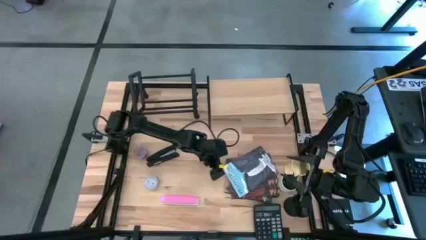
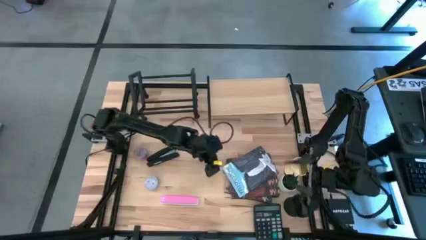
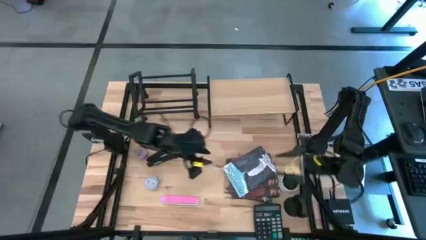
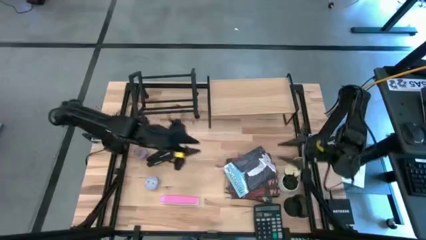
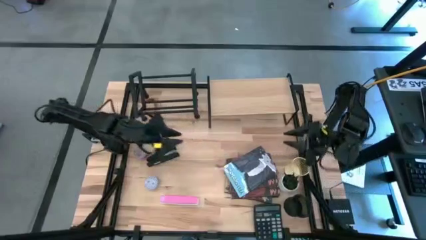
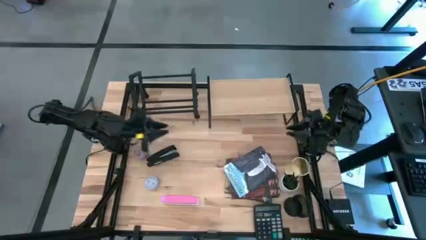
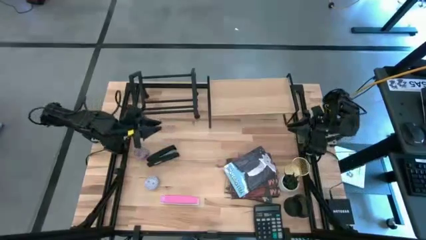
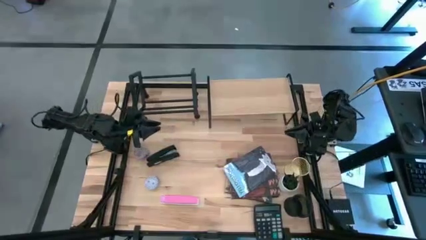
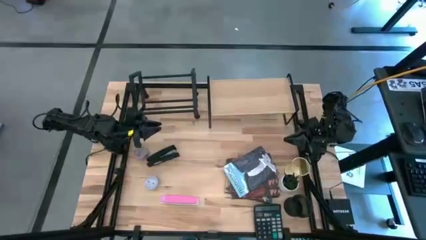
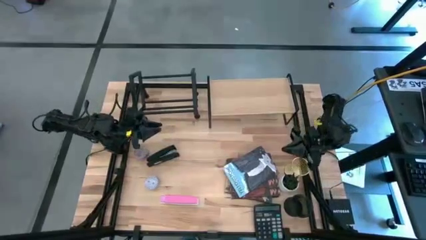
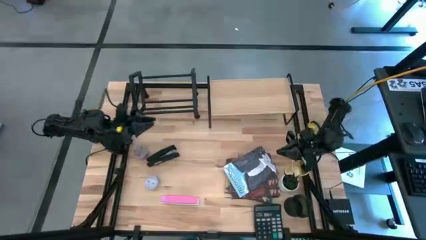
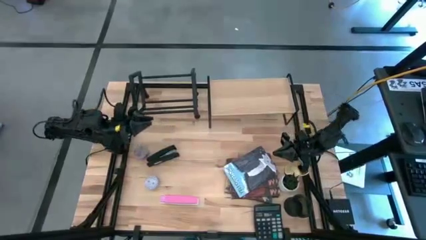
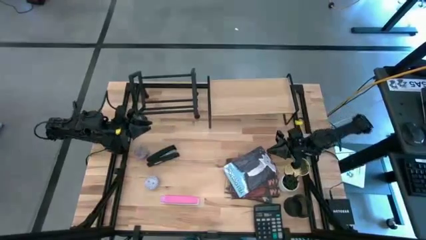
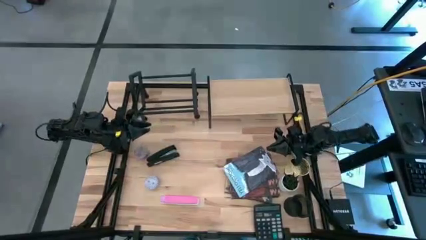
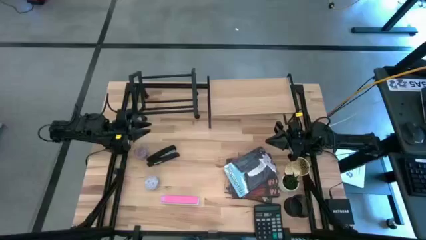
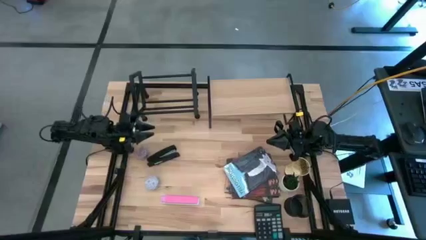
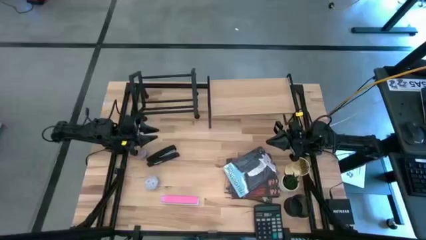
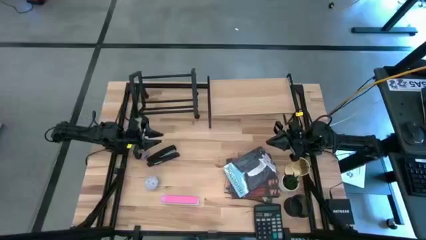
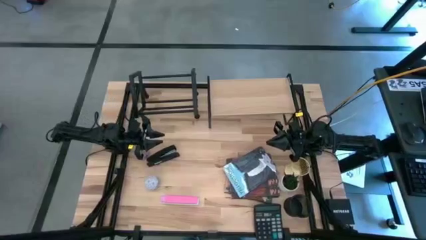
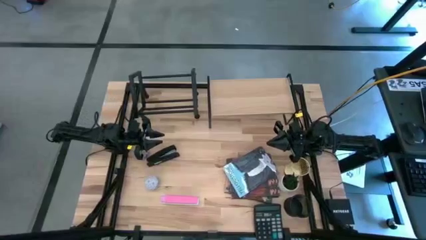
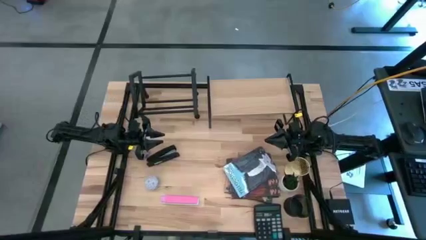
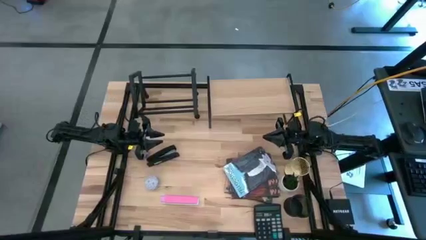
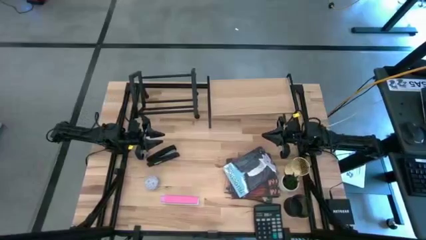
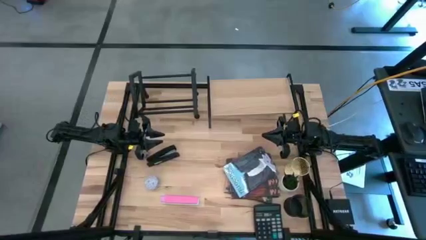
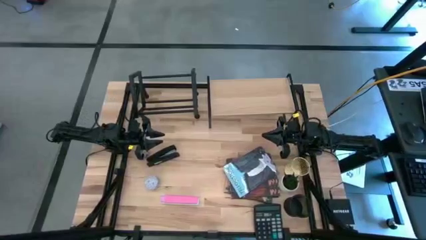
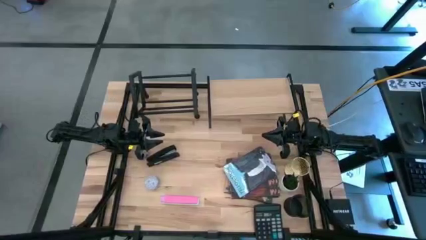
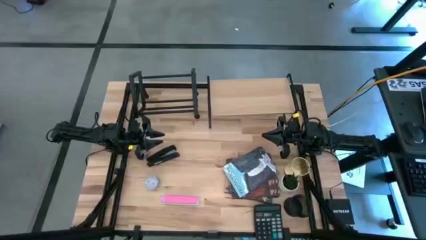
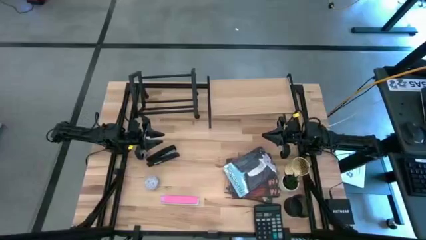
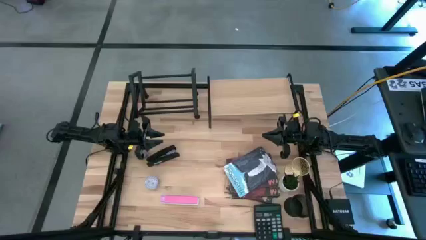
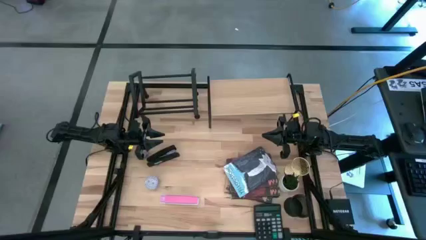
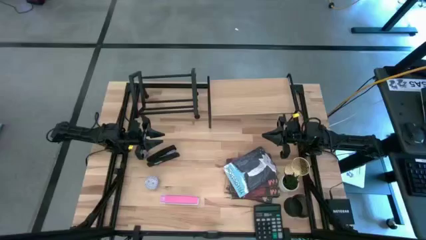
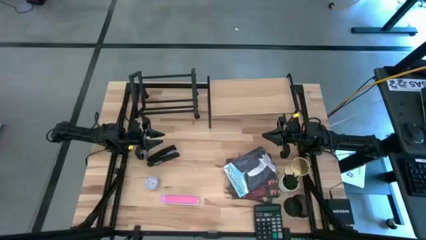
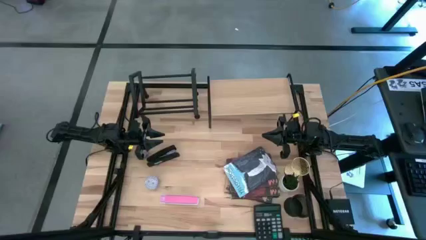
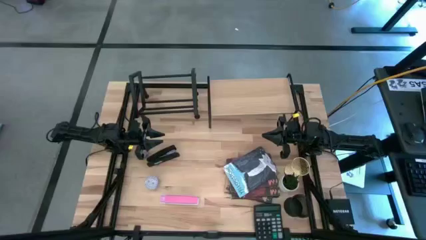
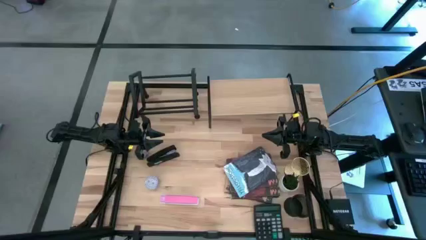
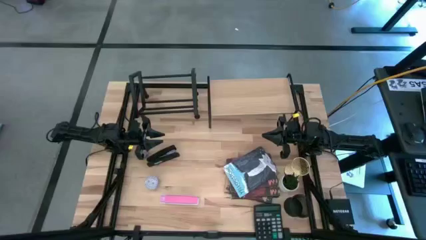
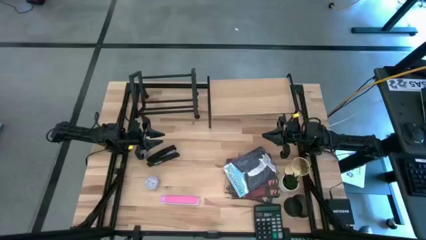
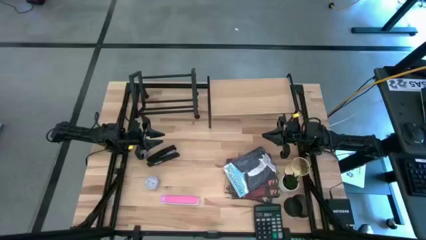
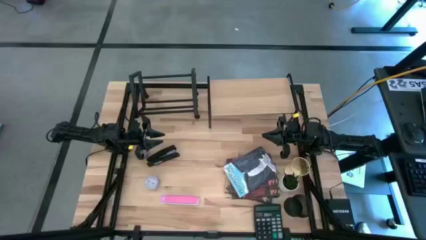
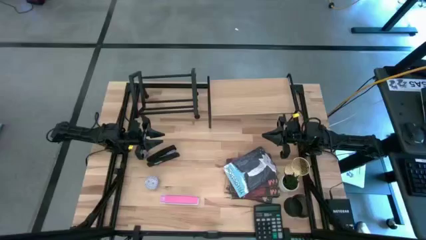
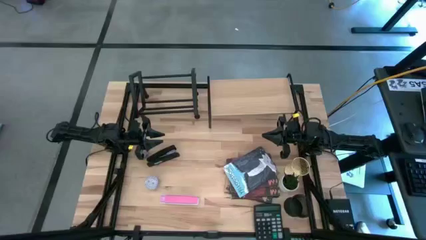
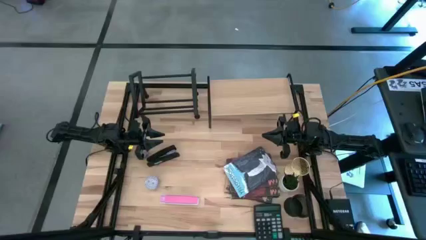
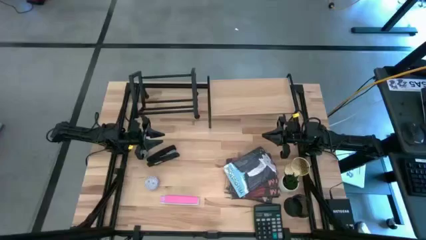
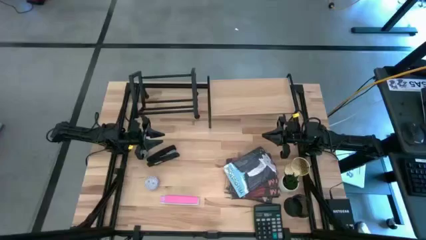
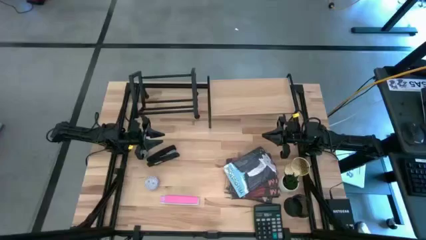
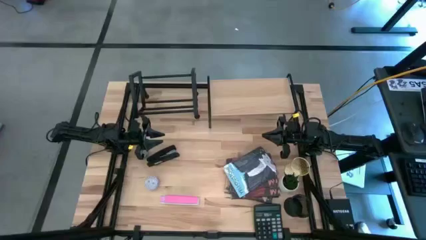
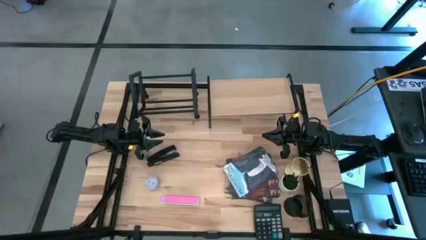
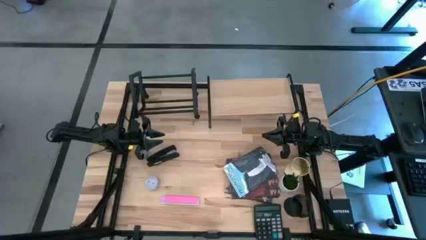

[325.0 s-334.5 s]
Task: Stock shelves
Return to home position

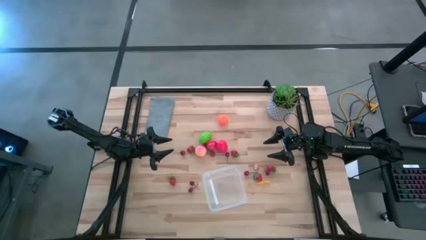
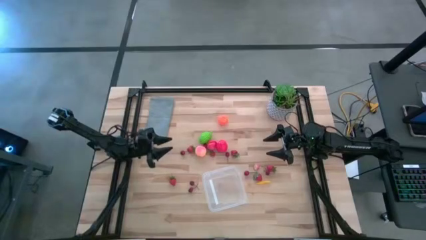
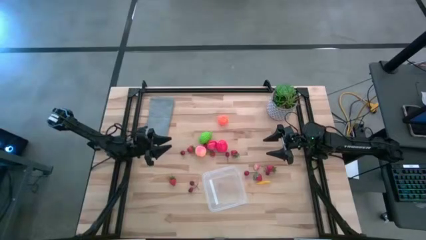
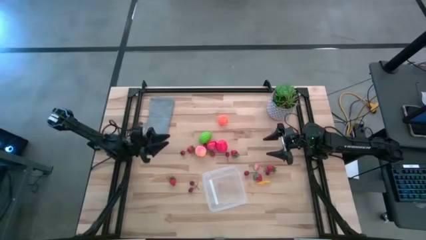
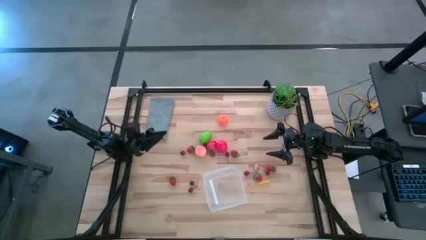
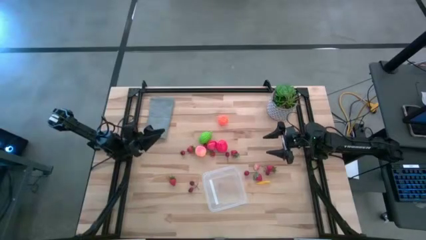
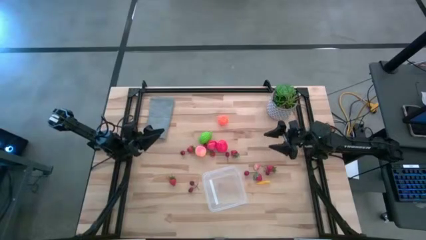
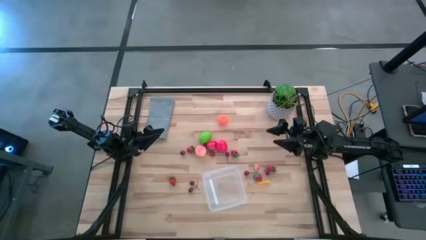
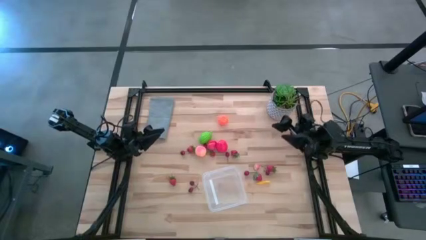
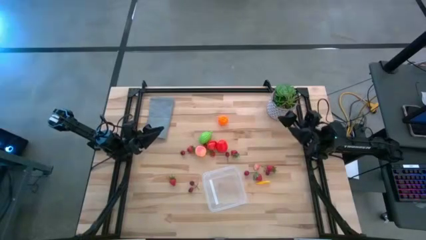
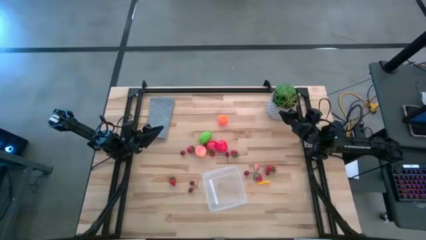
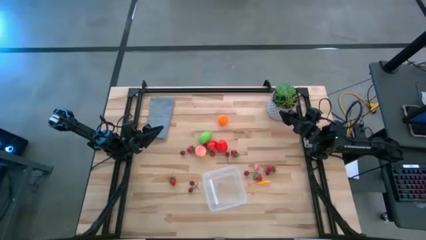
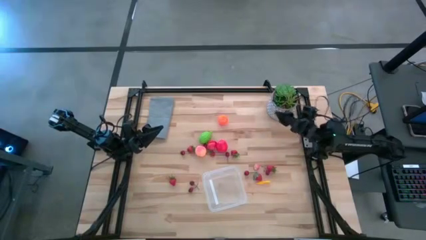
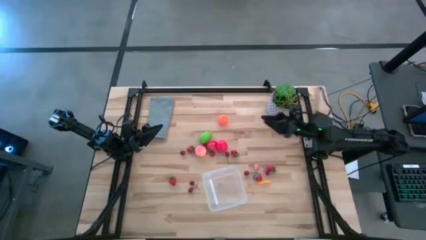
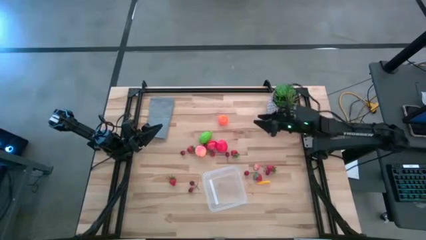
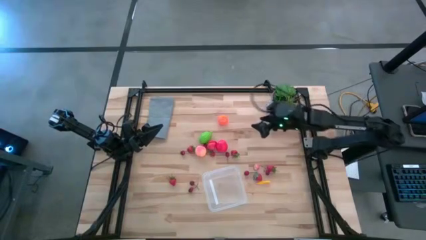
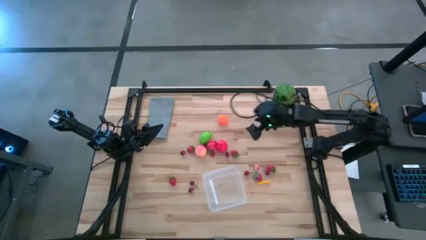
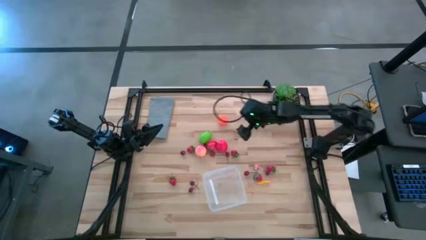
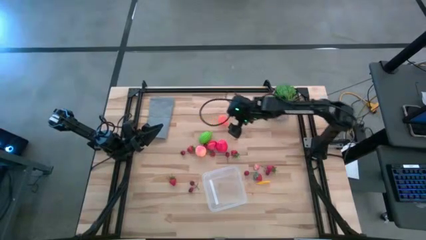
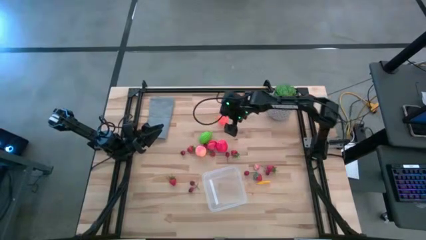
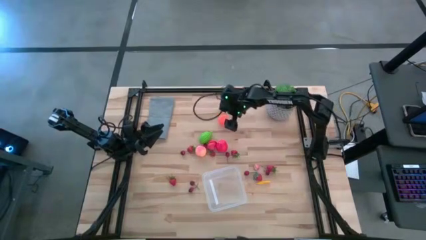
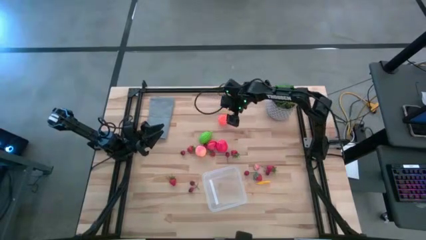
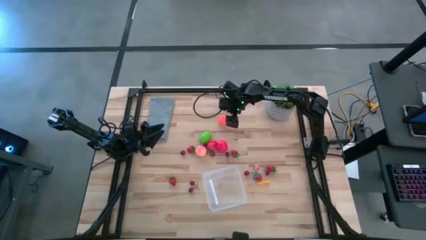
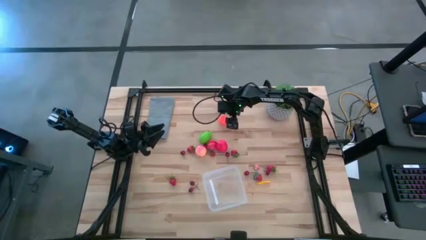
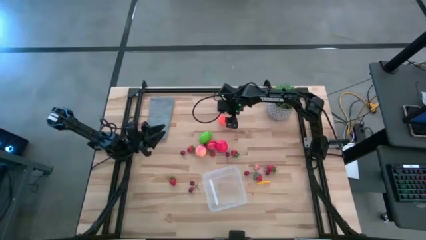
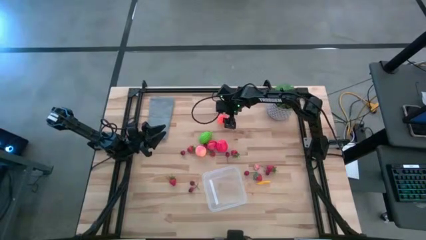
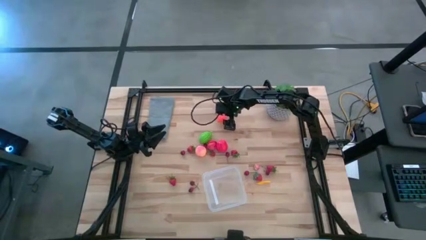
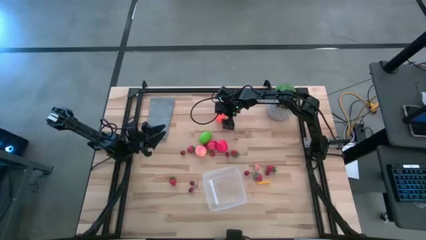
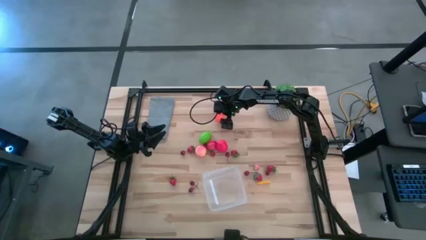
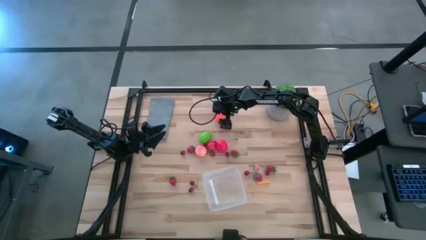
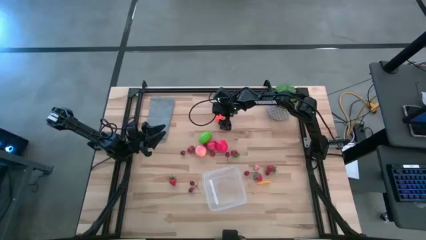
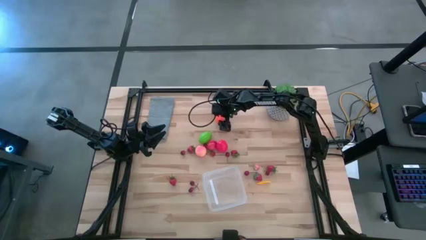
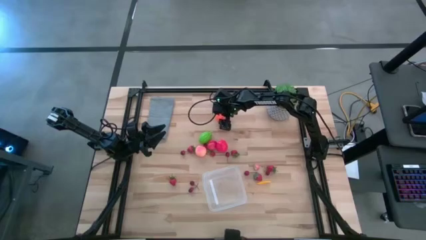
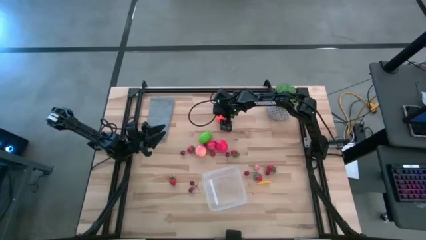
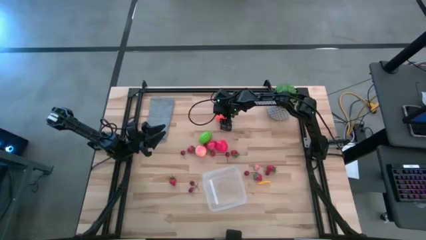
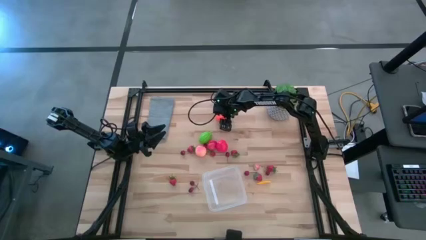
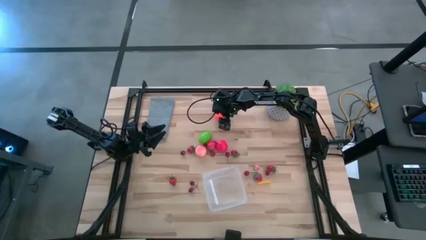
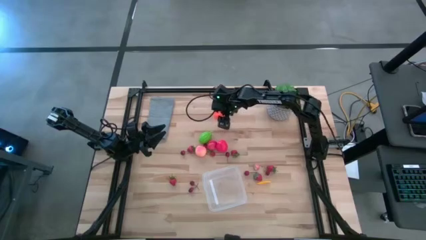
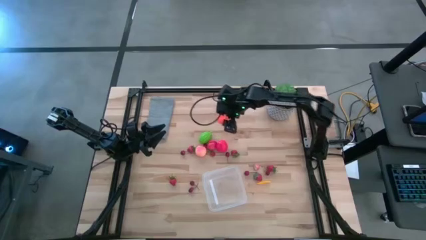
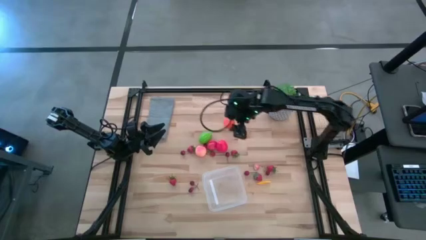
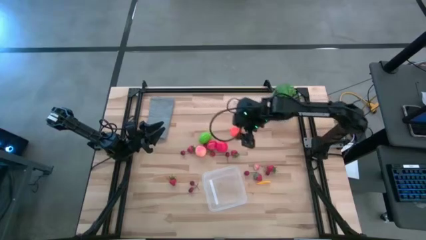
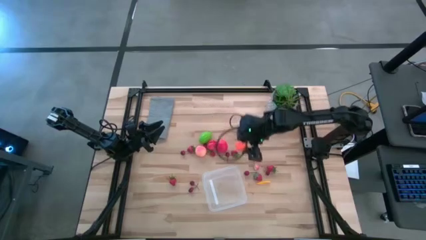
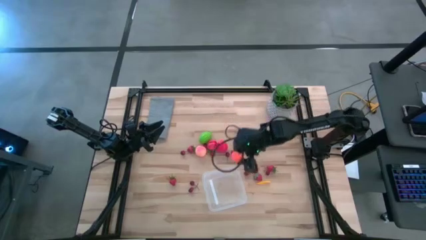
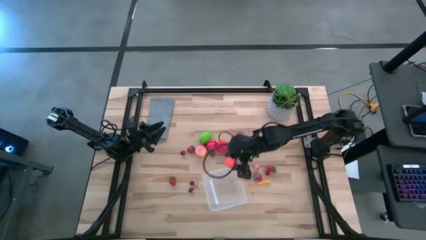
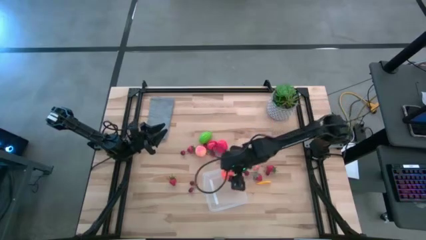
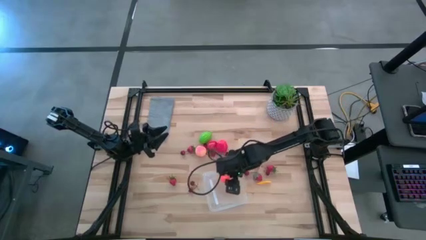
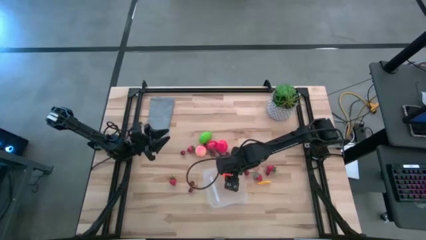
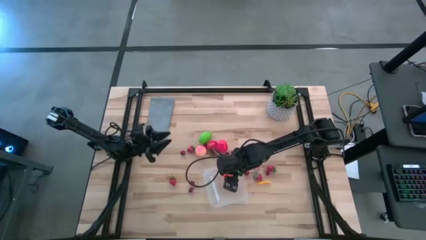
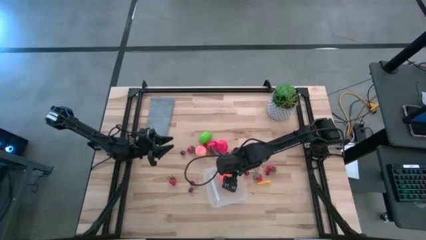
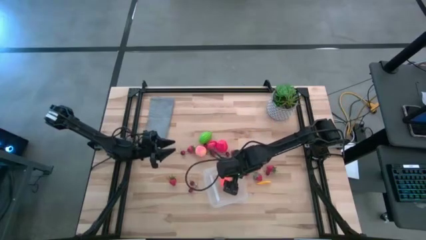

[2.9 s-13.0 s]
Task: Pick and placing Produce into tupperware
Put the orange pumpkin into the transparent bin
